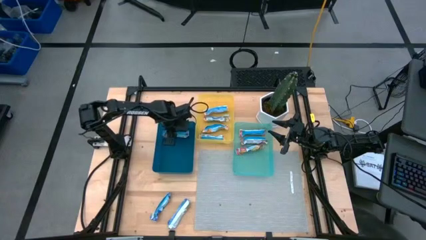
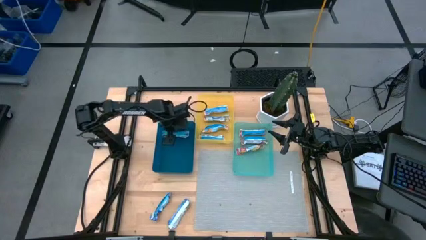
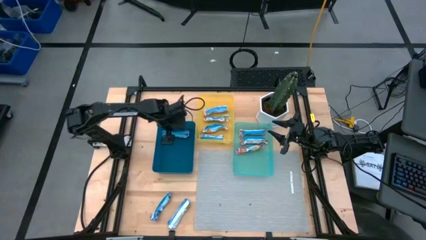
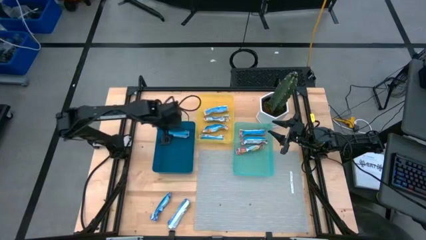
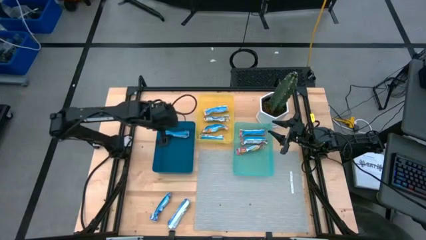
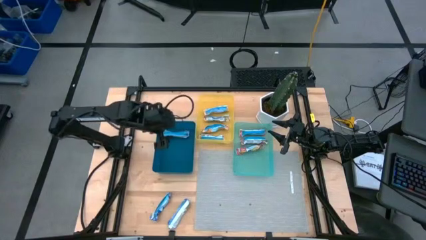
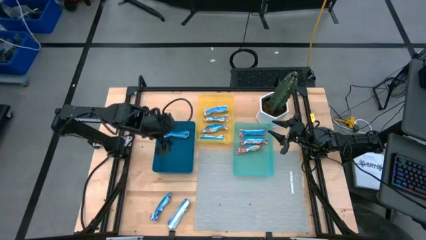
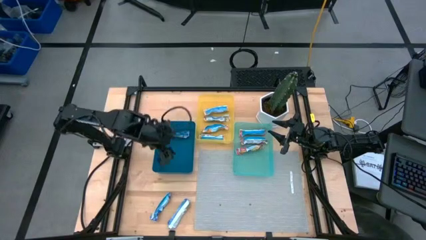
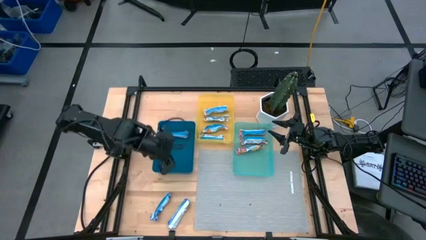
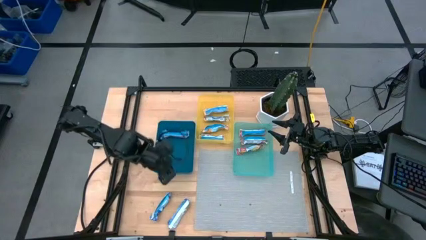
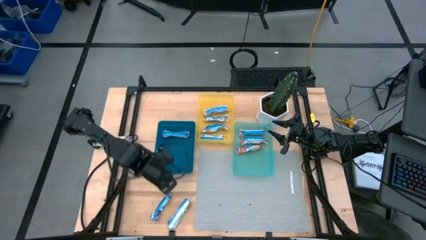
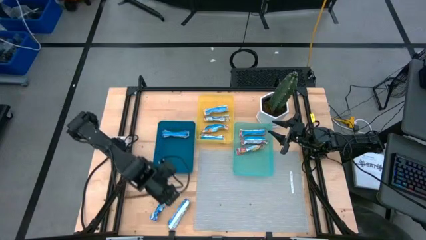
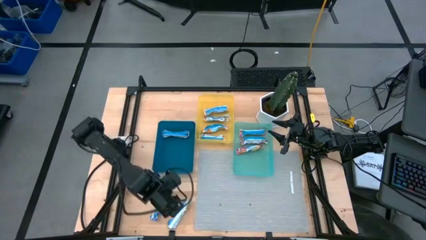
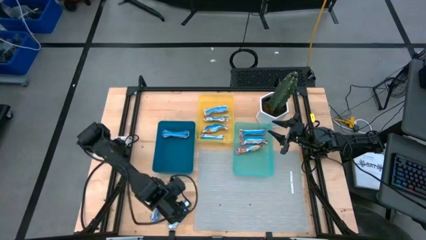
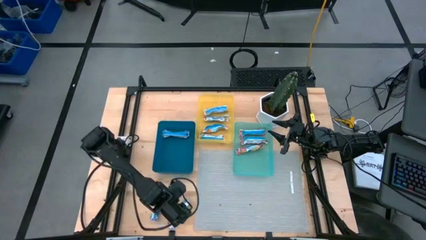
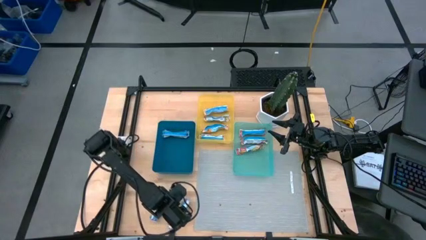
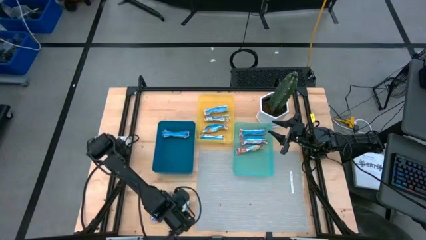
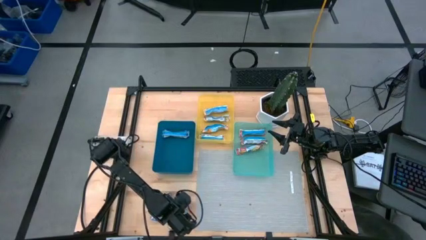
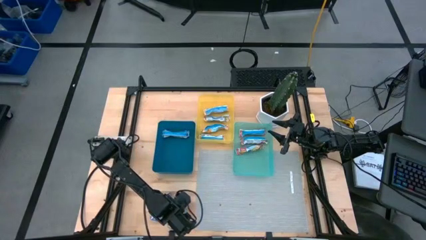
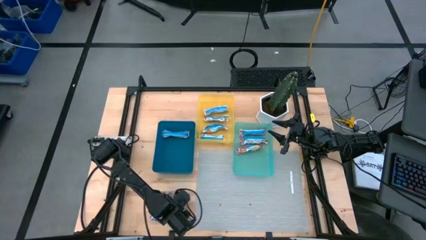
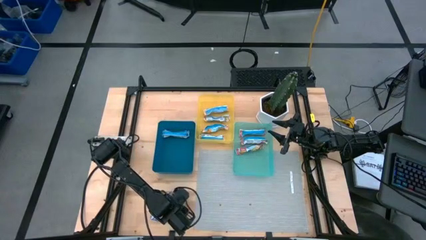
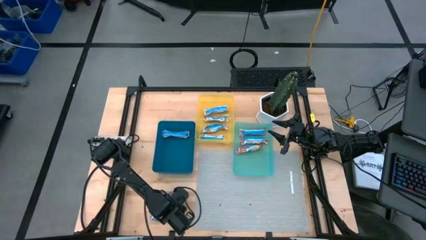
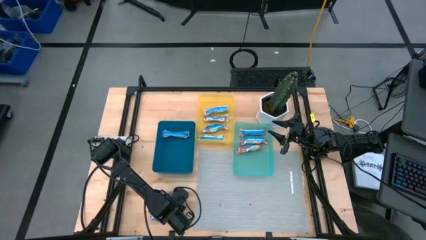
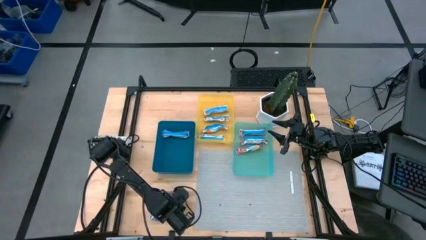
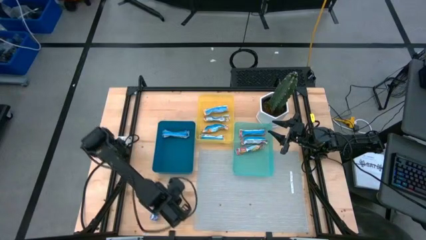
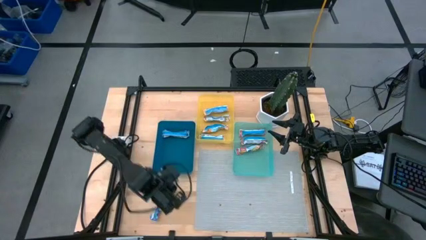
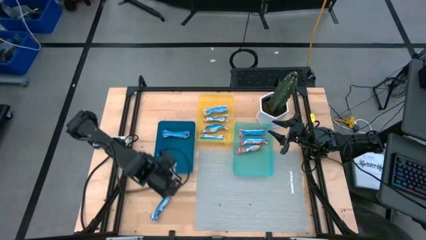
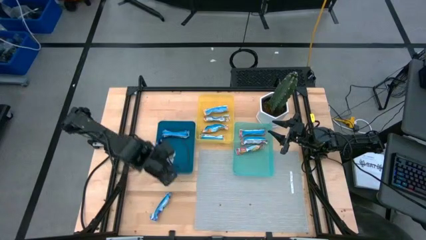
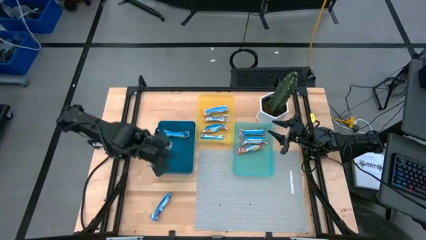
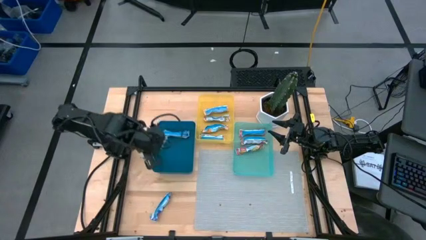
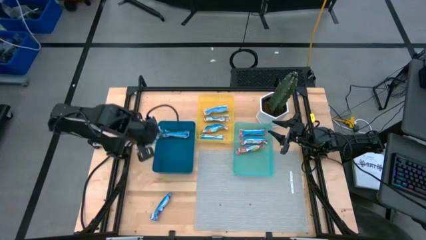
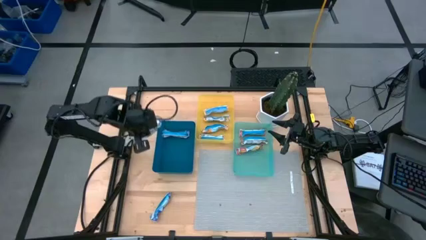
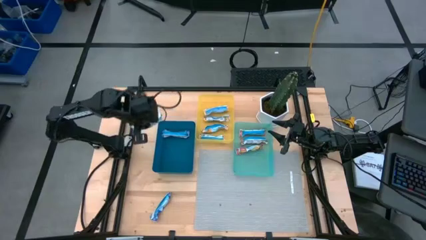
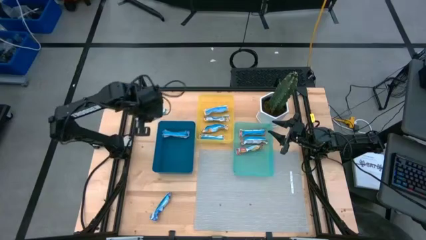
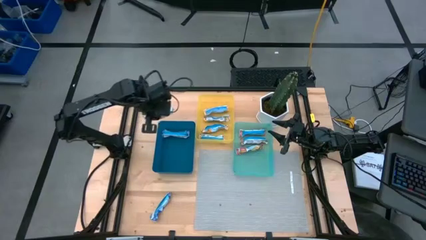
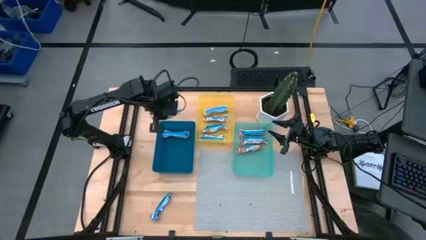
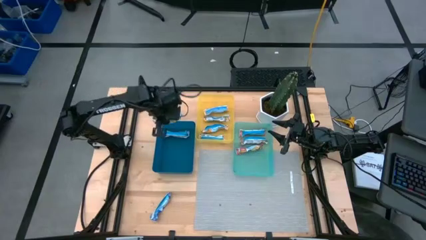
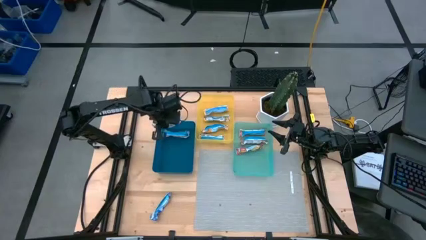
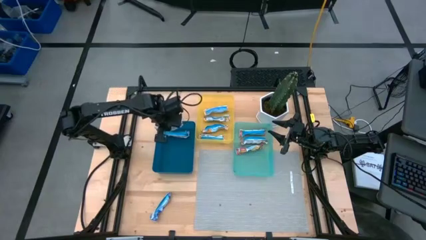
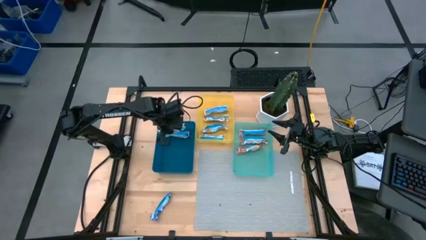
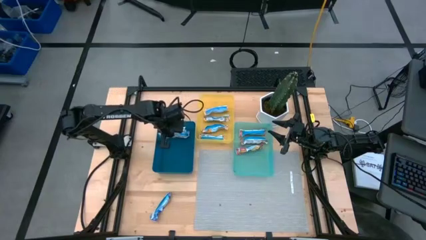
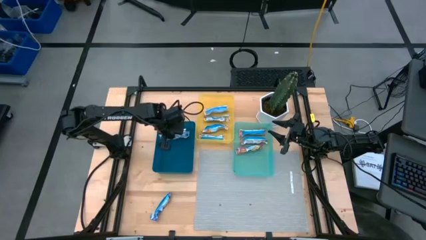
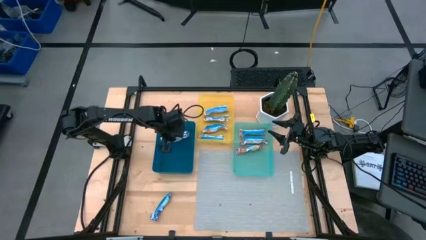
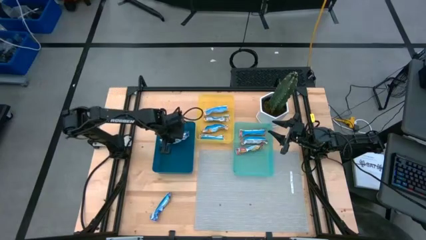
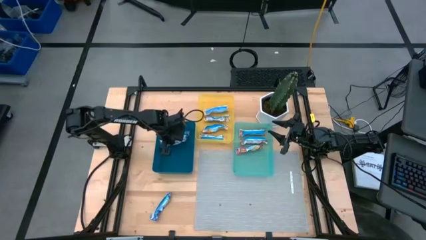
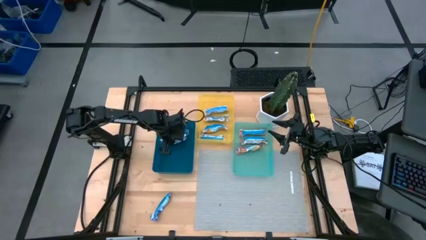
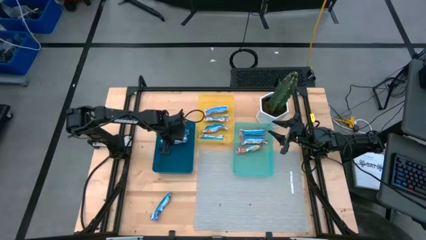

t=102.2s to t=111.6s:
Task: Pick and place Granola Bars by type
Put the blue granola bar into the blue bin

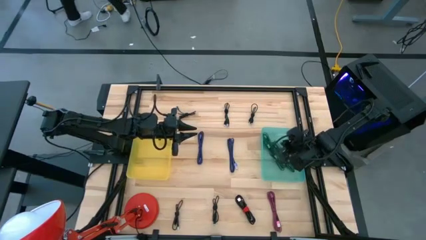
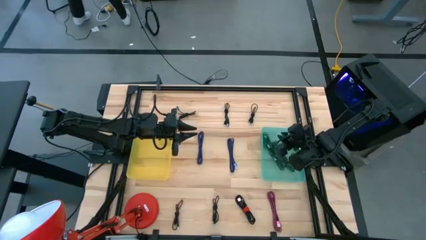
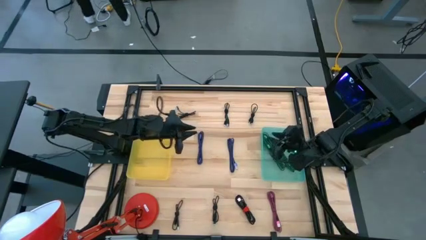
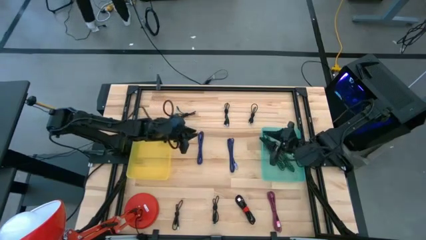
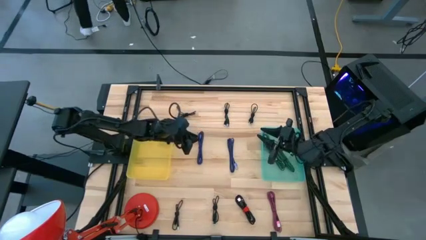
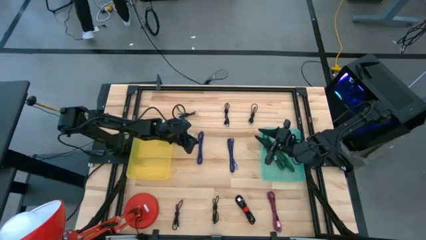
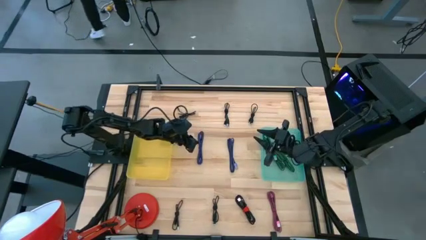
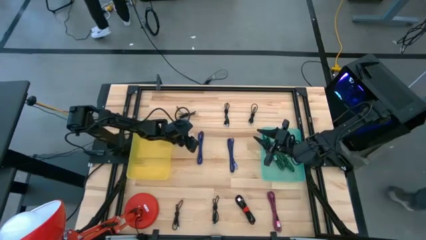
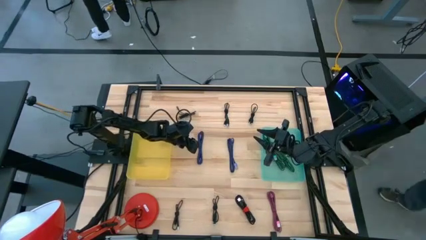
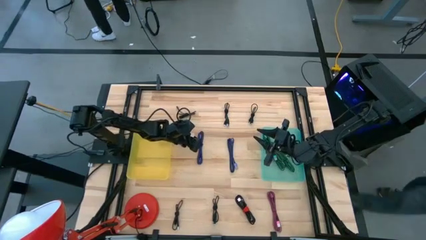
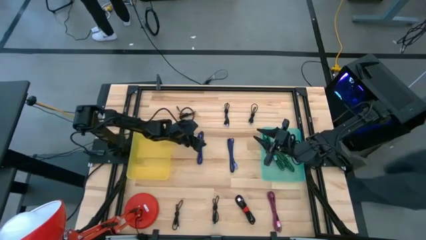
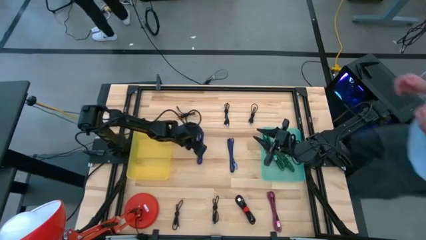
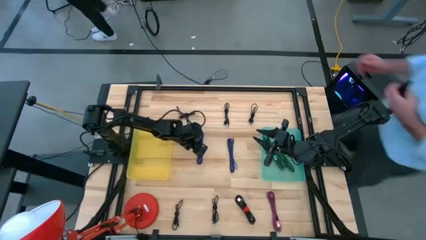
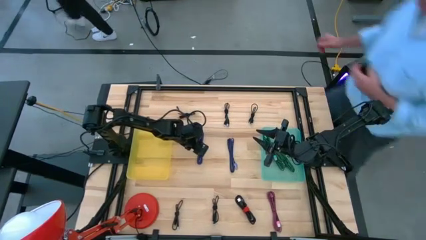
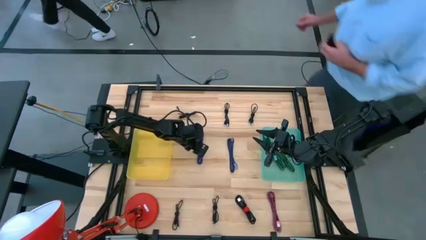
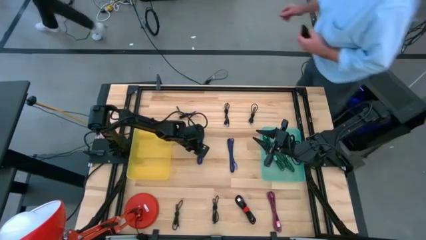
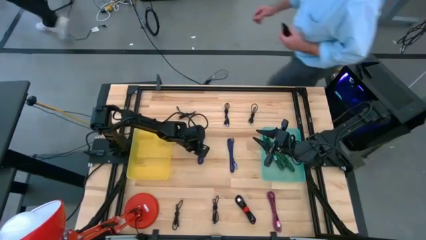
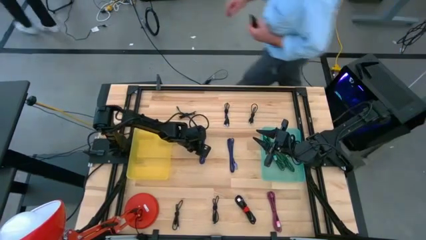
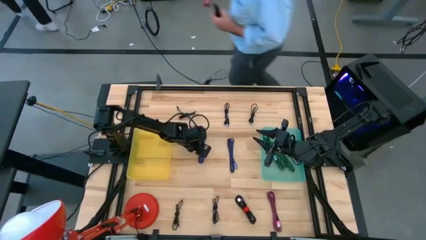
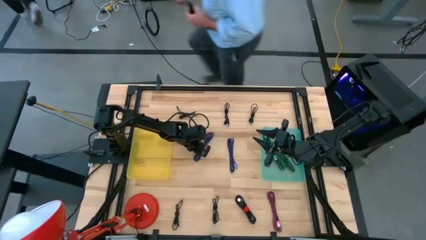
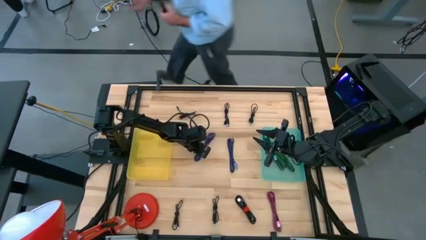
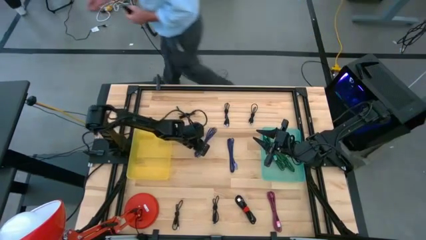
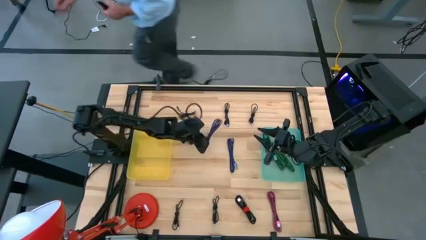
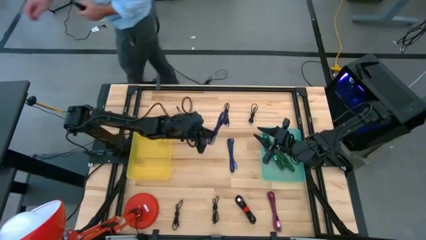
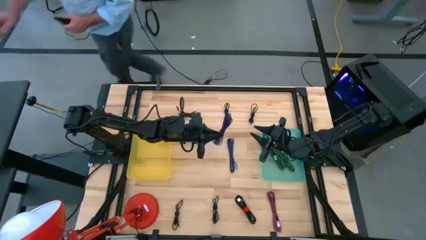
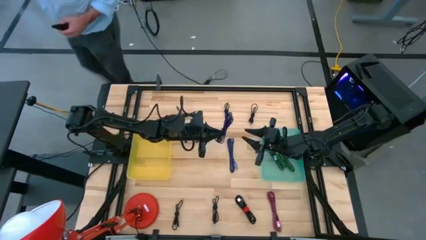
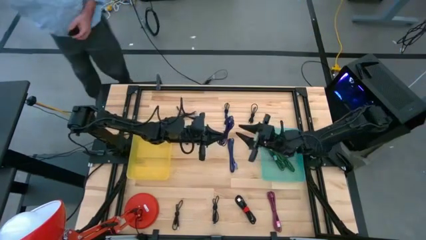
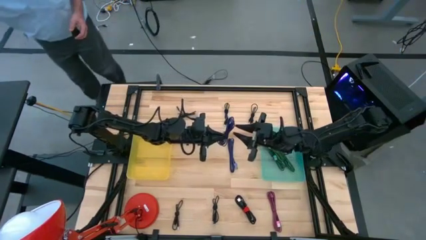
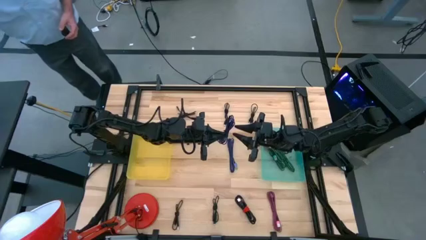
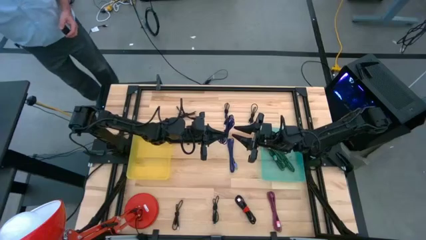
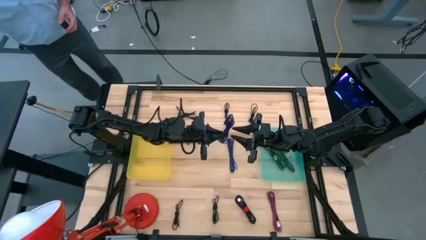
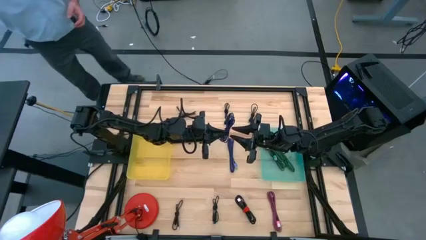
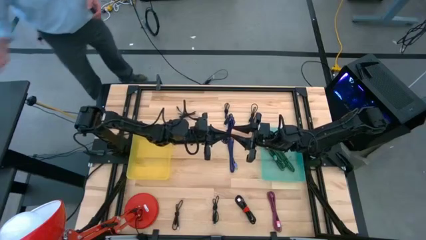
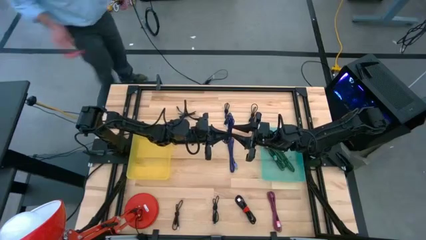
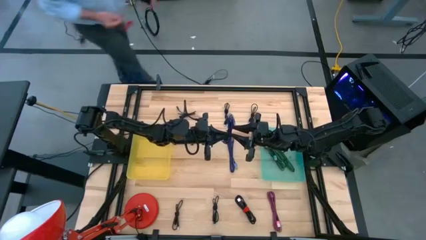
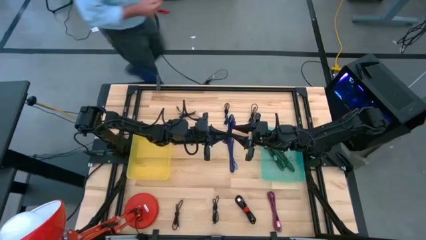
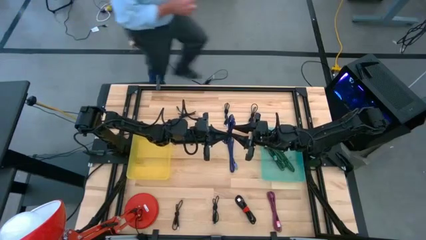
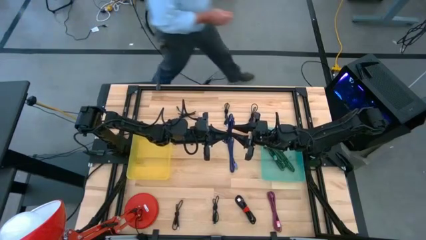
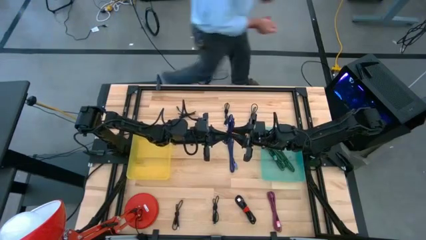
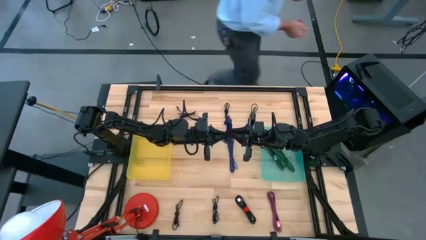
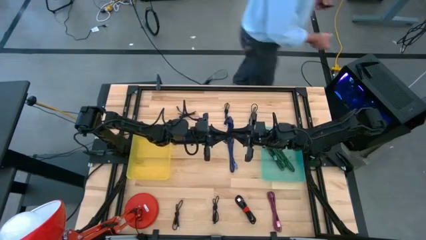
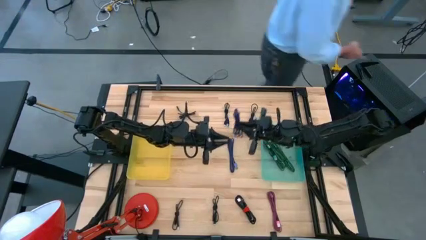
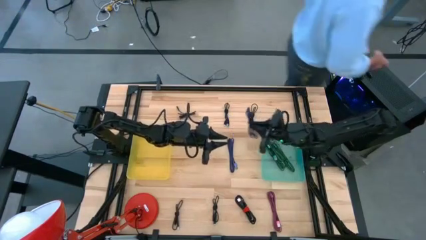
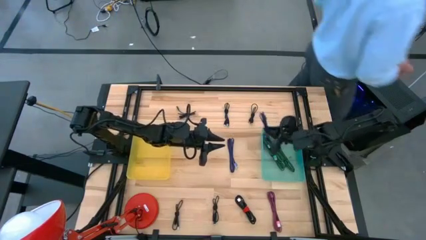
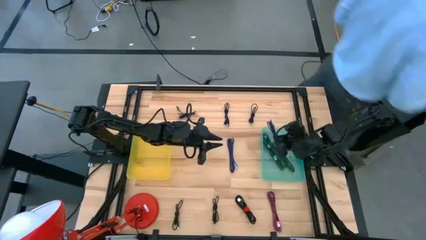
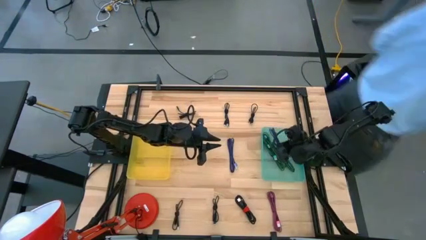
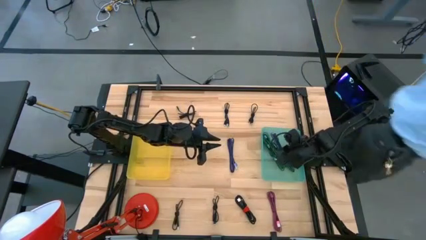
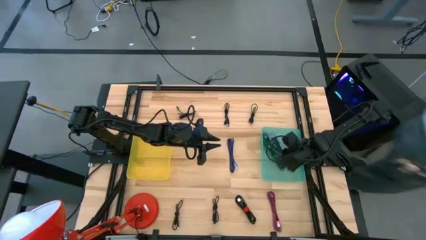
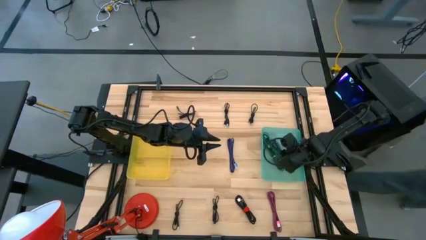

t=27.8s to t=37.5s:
Task: Pick & Place USB Port
Put the left purple and white charger cable into the light green bin
